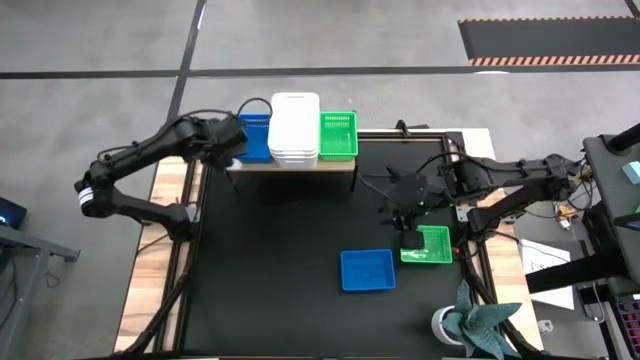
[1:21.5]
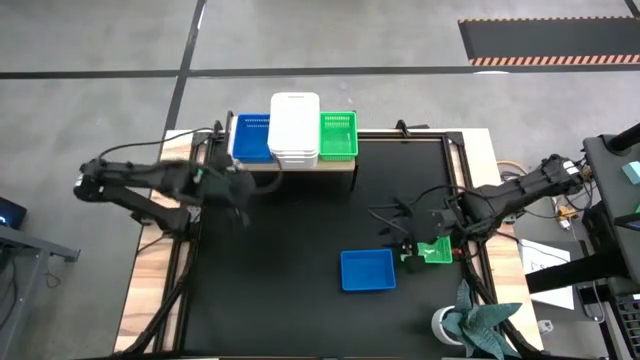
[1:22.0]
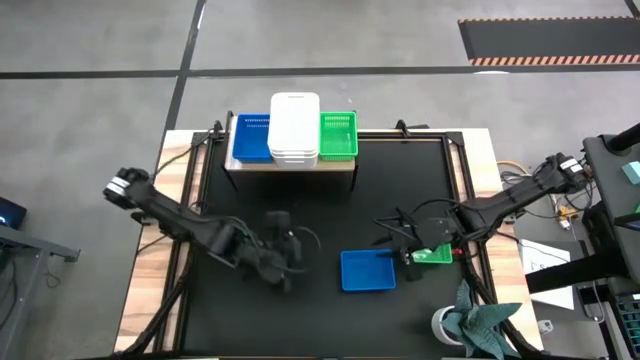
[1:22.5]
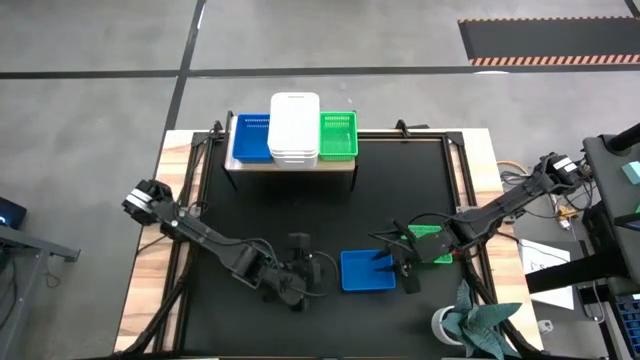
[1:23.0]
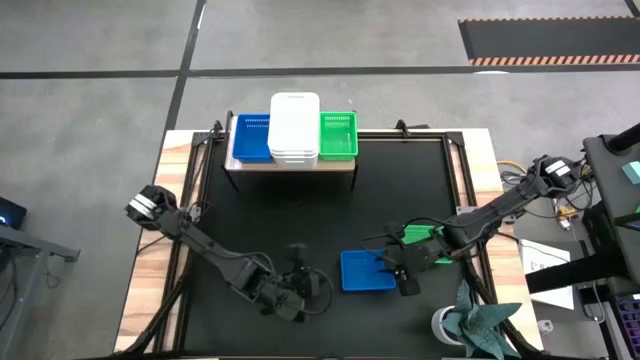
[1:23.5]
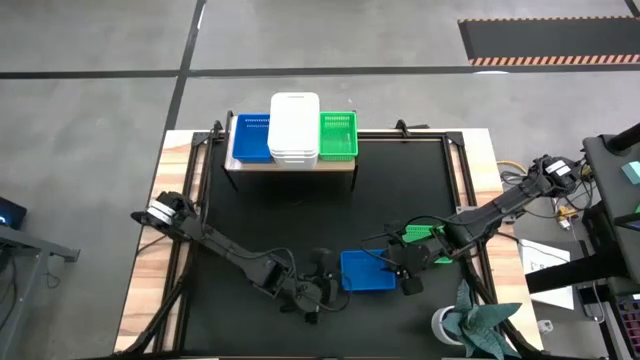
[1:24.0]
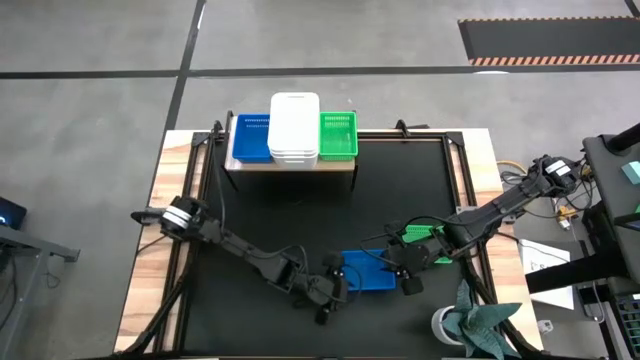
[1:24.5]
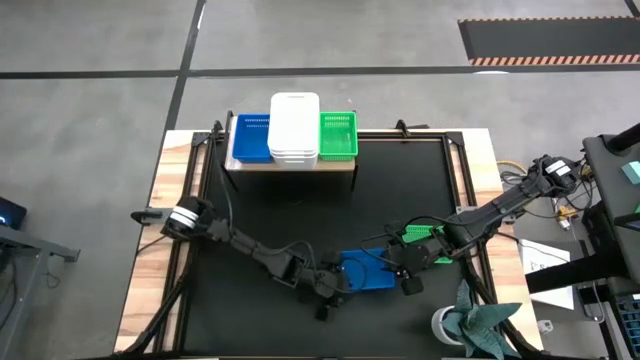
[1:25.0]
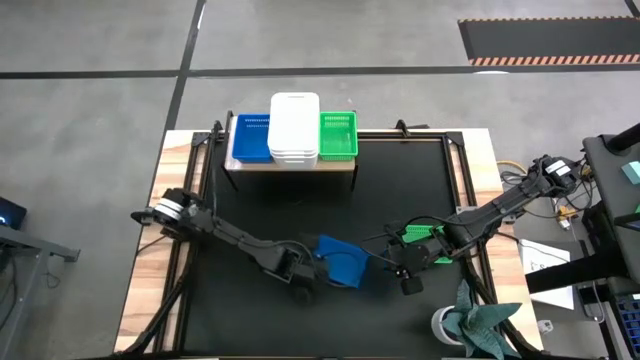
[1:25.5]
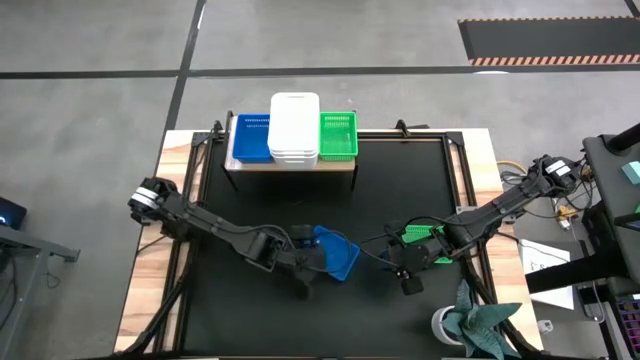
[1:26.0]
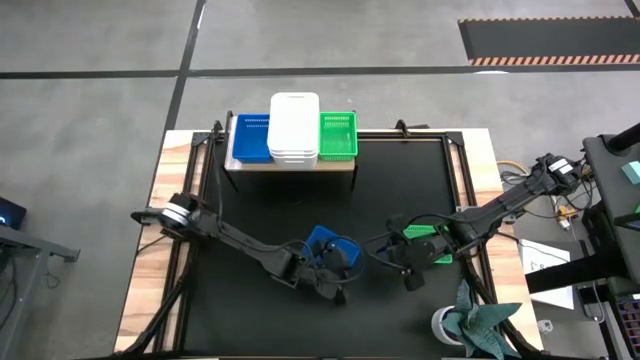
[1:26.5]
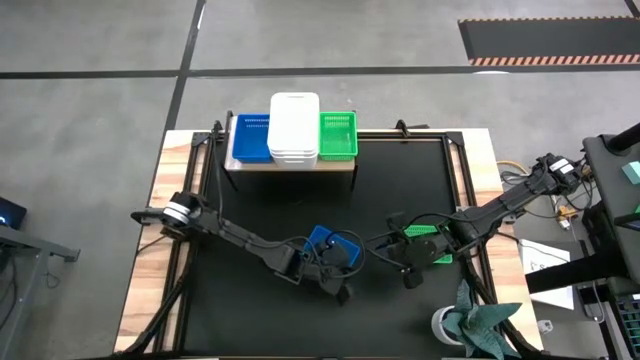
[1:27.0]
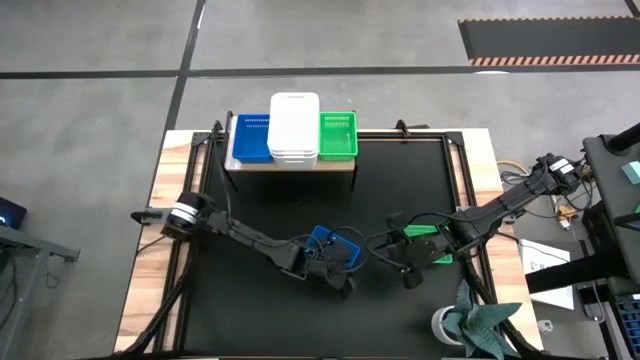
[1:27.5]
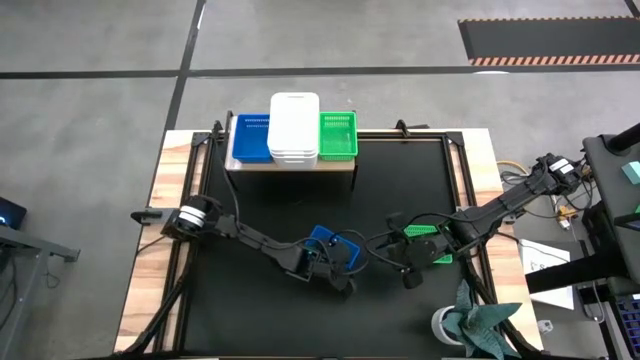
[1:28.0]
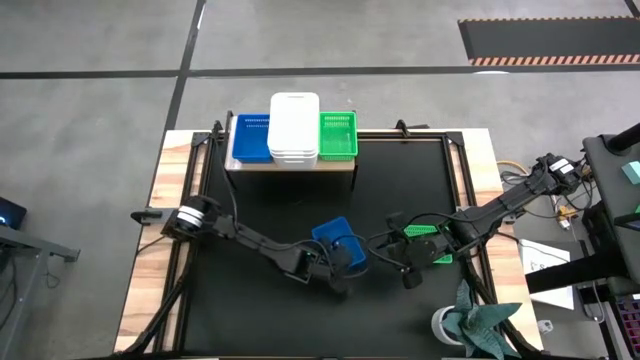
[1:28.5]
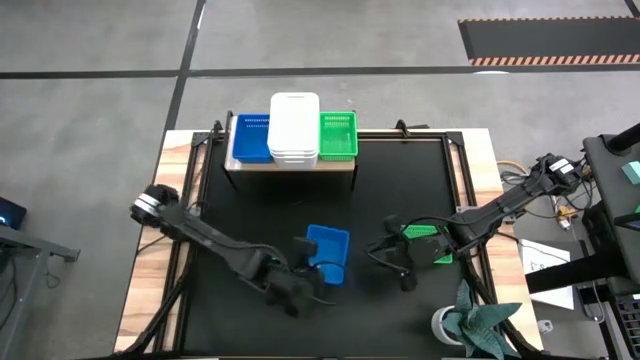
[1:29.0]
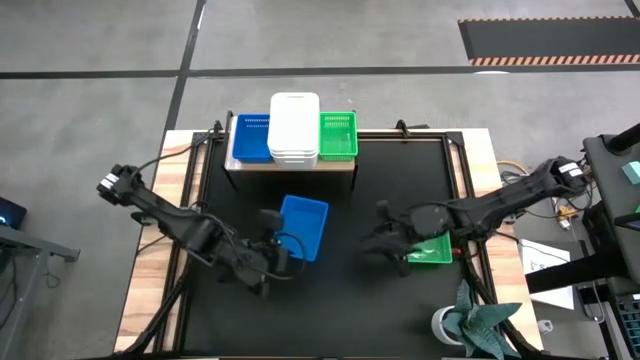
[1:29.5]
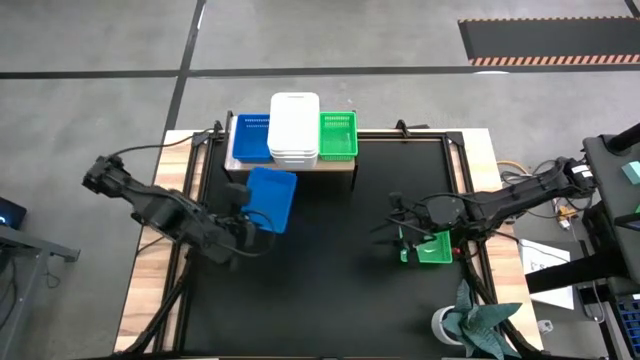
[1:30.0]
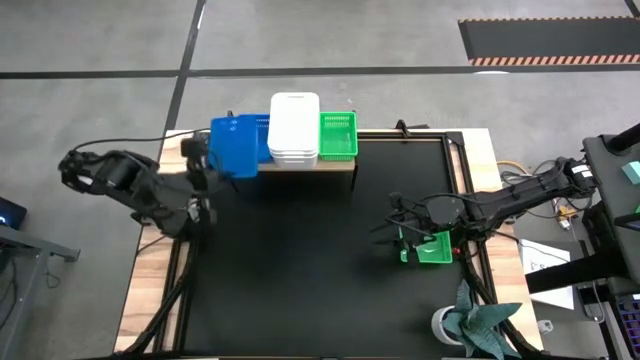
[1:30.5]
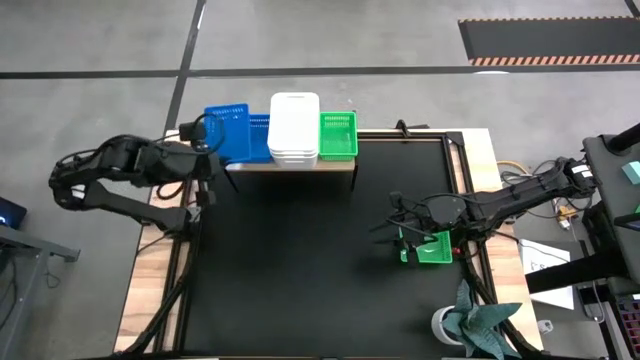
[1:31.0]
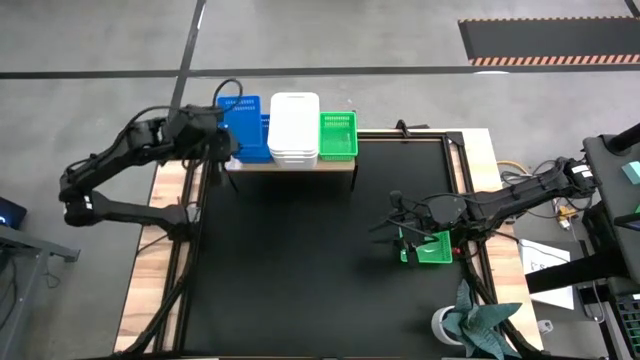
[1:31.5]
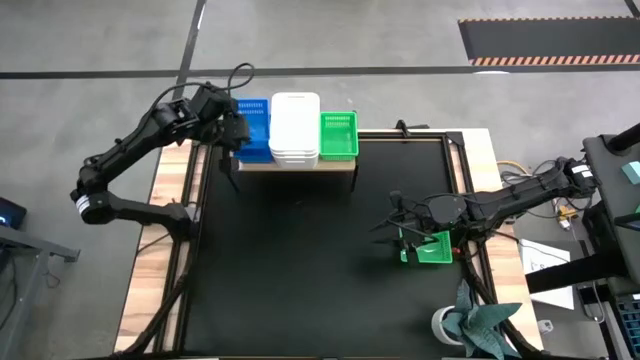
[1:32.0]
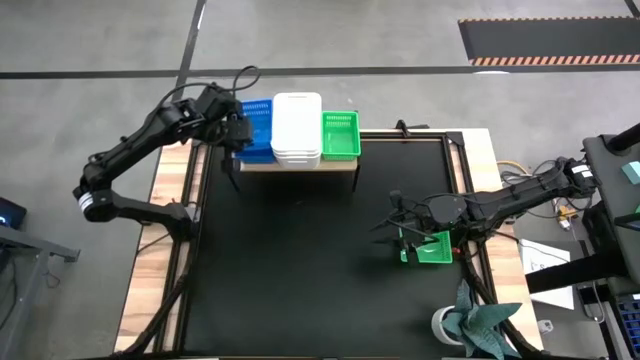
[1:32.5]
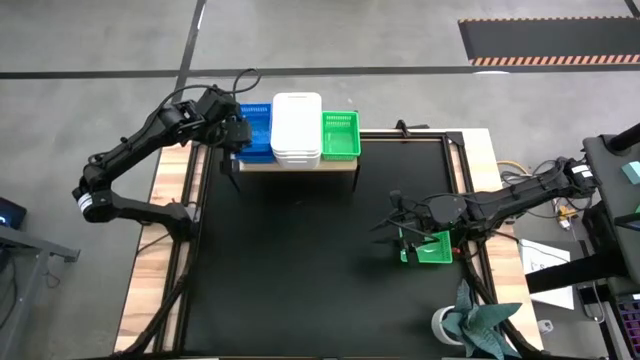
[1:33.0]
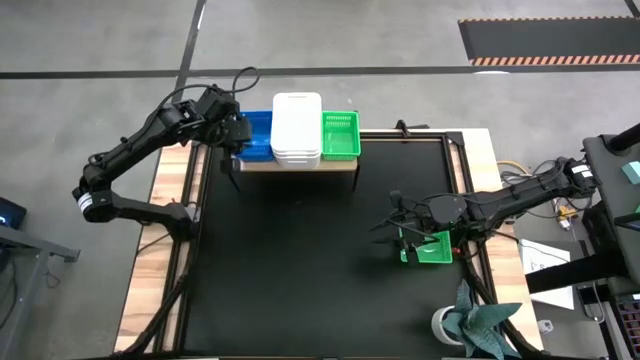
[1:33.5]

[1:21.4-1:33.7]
Task: Stack baskets on shelf by color
Stack the blue bin on top of the blue bin on the shelf

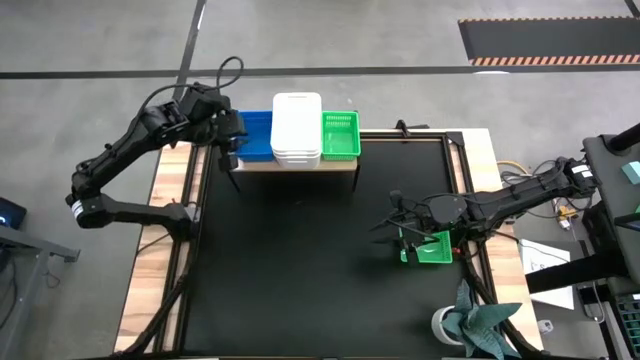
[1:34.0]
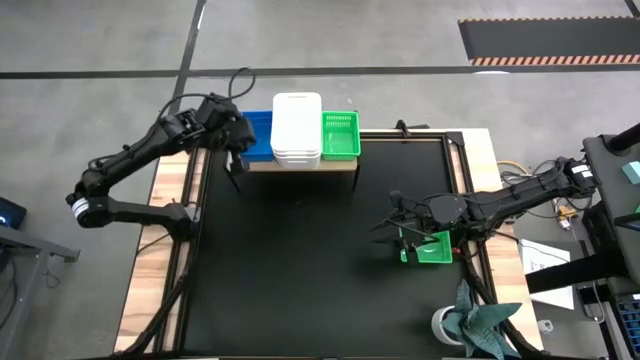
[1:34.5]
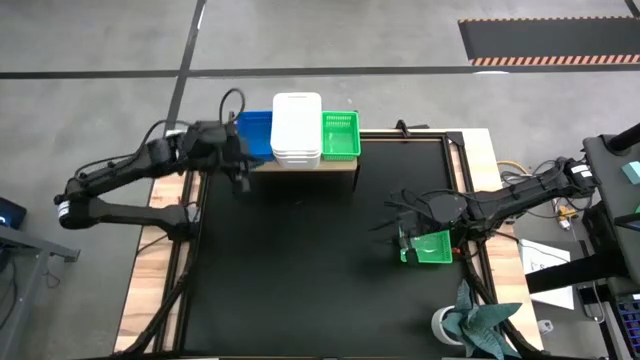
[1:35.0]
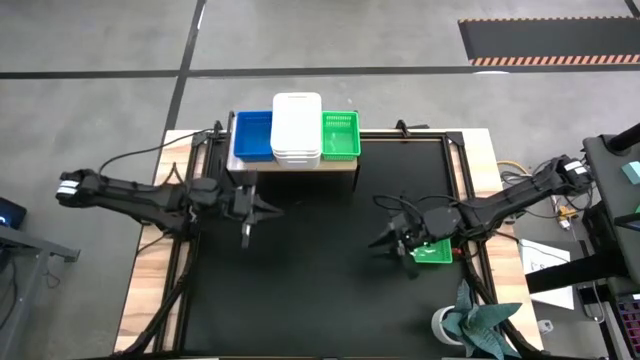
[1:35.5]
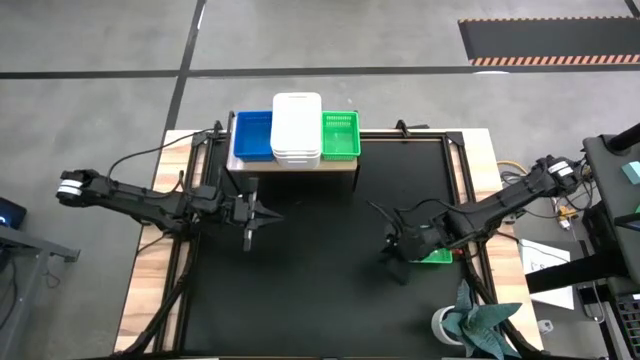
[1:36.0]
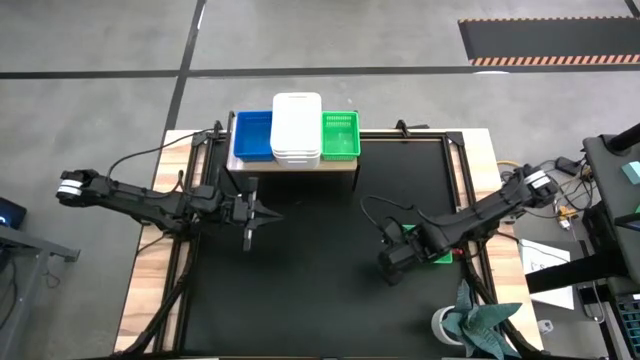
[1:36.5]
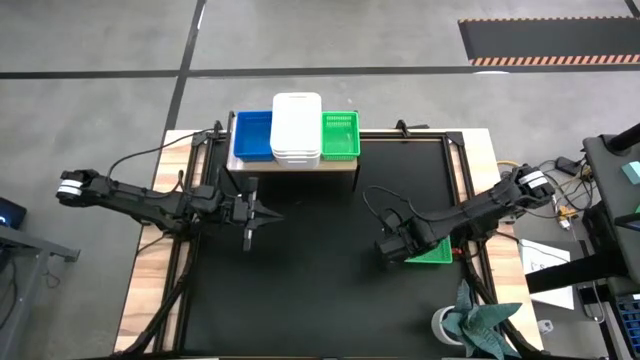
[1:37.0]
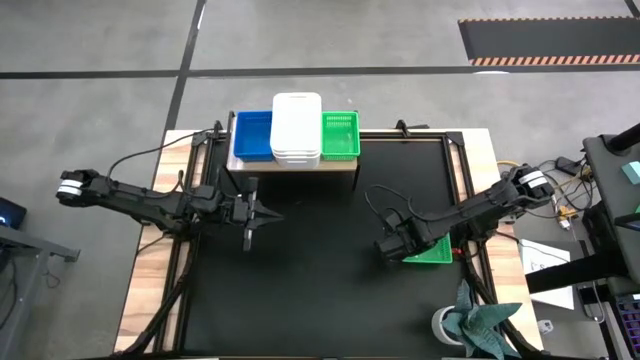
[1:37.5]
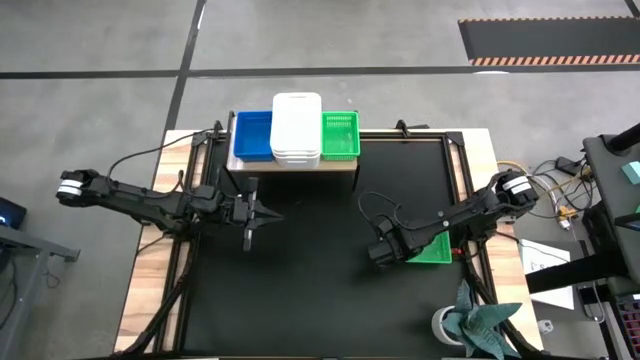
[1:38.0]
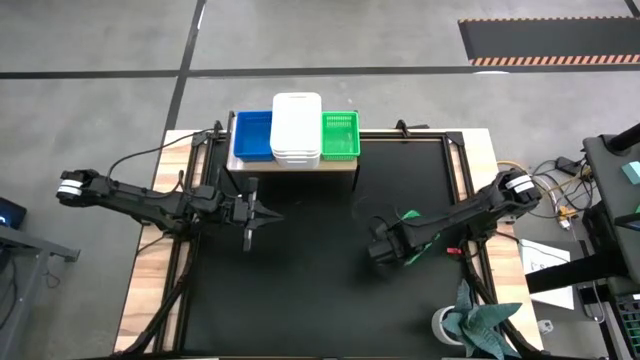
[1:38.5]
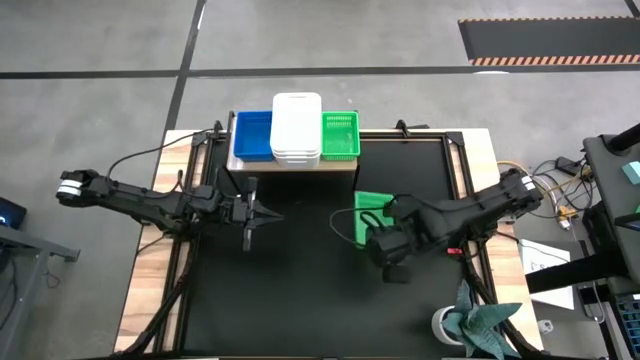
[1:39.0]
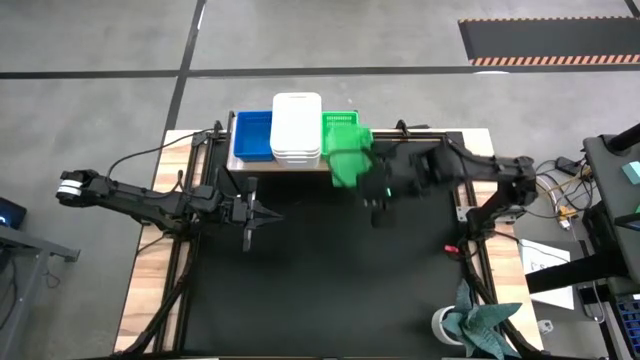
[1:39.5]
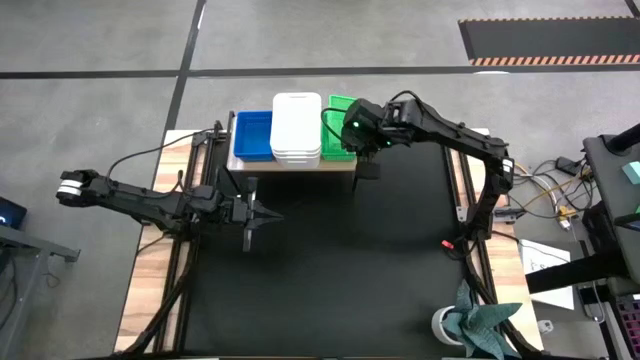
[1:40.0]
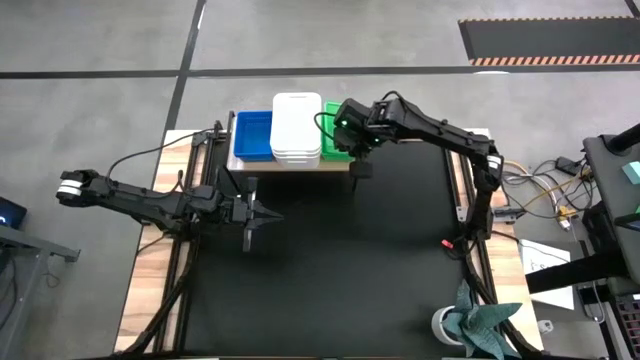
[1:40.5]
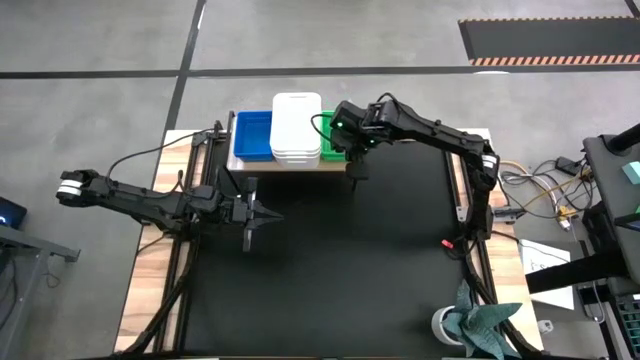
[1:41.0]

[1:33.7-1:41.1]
Stack the green bin on top of the green bin on the shelf

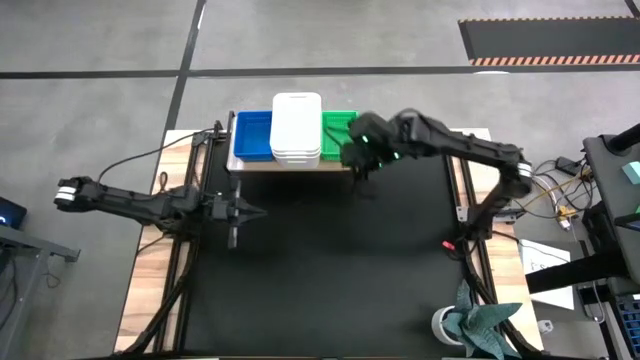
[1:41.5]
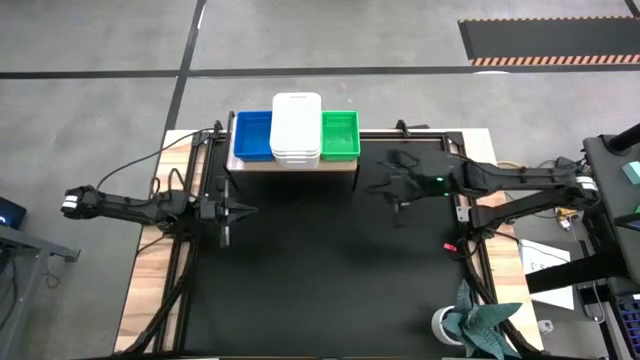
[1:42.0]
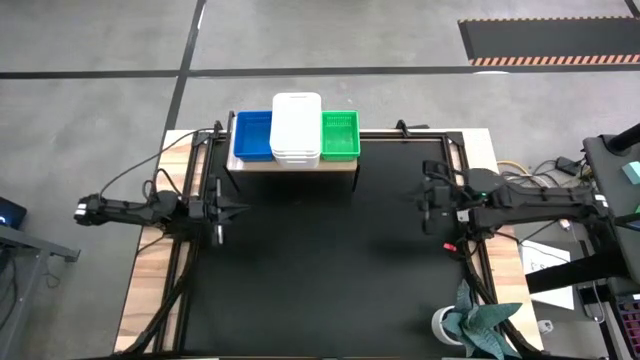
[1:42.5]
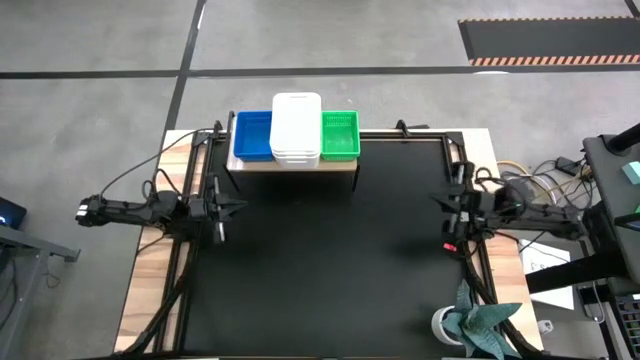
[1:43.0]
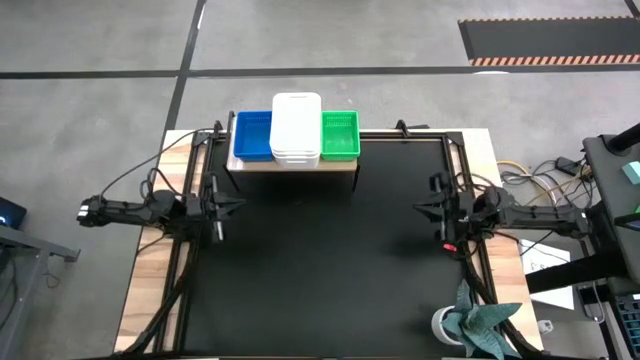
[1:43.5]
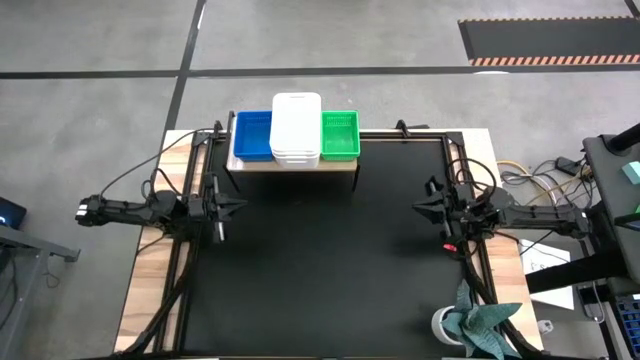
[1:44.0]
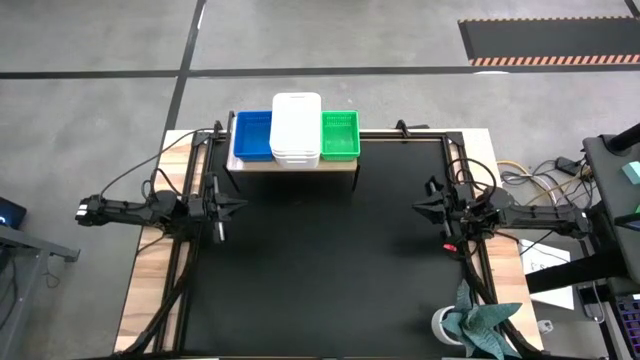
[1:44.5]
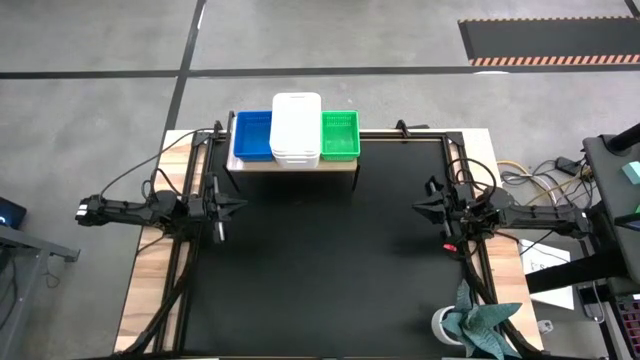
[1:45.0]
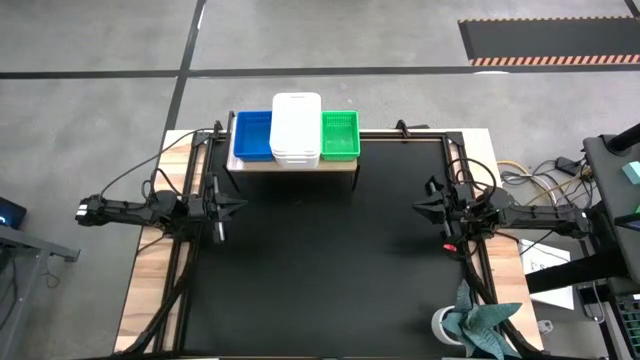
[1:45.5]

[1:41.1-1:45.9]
Return to Home Position
